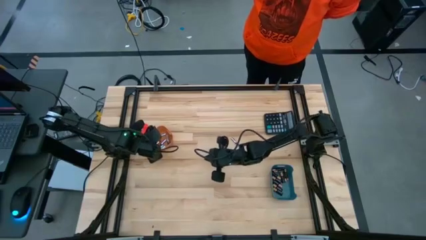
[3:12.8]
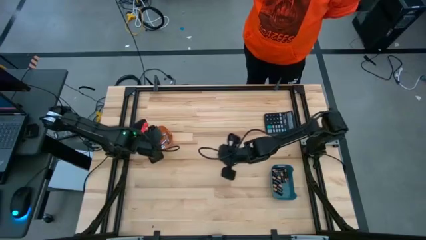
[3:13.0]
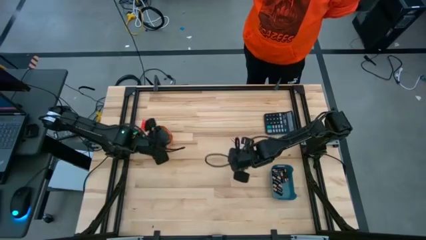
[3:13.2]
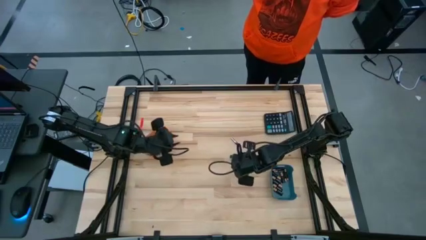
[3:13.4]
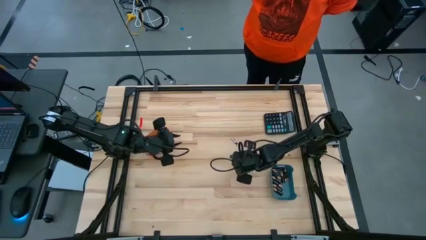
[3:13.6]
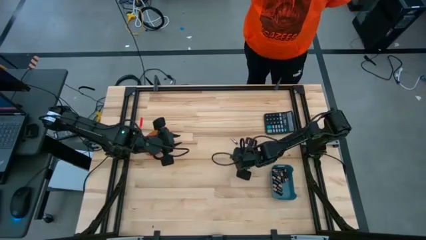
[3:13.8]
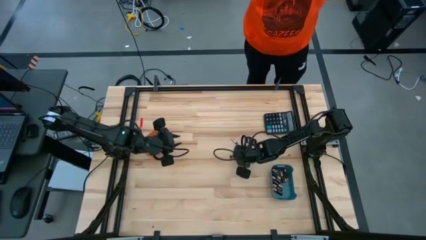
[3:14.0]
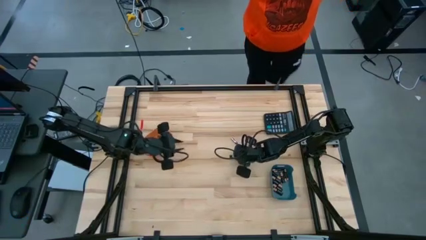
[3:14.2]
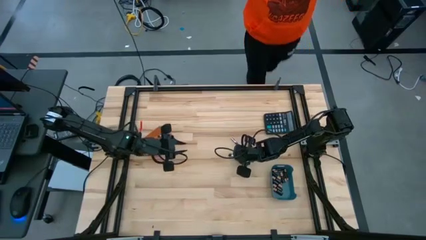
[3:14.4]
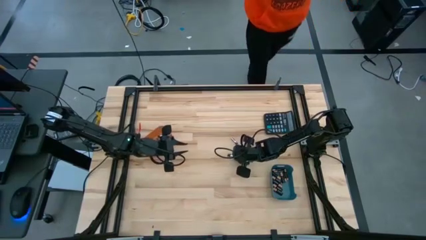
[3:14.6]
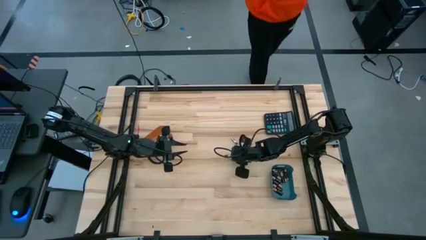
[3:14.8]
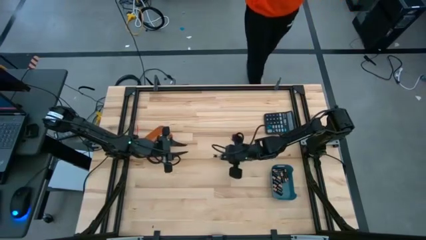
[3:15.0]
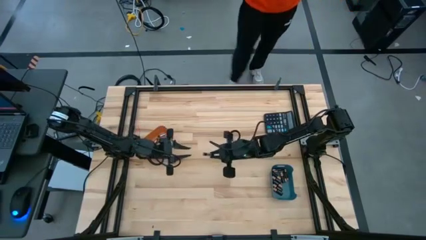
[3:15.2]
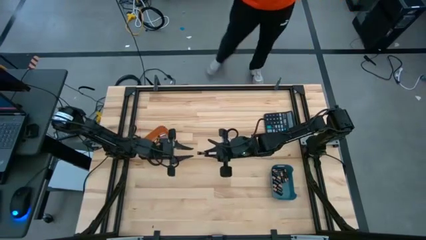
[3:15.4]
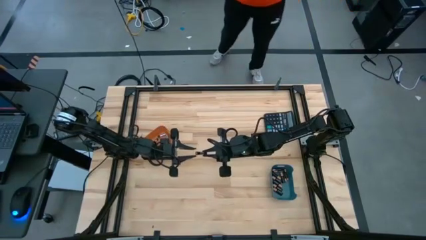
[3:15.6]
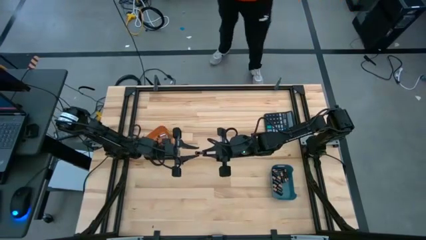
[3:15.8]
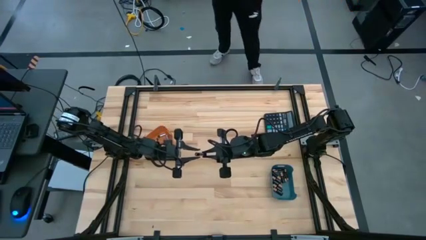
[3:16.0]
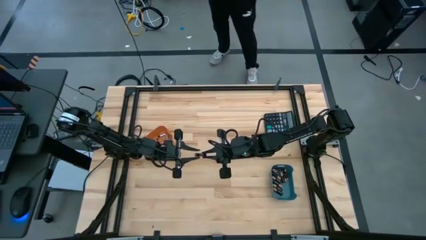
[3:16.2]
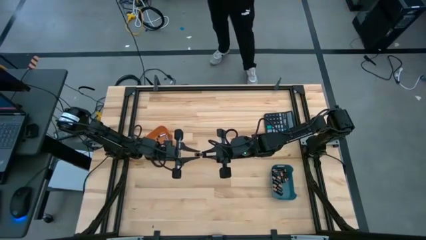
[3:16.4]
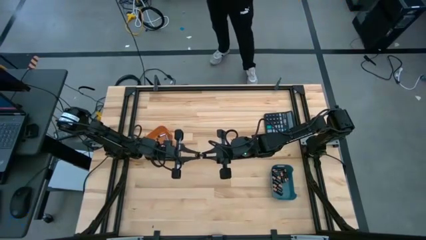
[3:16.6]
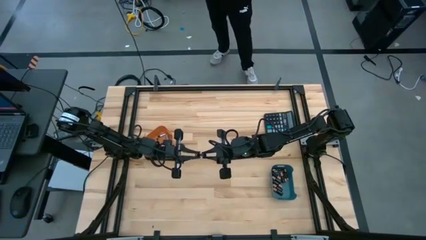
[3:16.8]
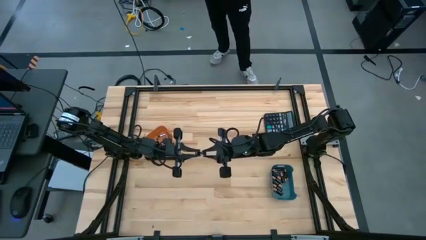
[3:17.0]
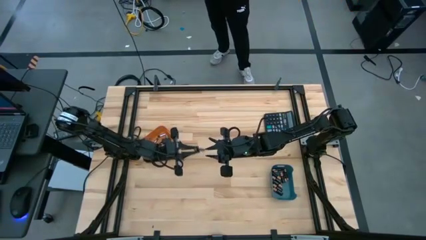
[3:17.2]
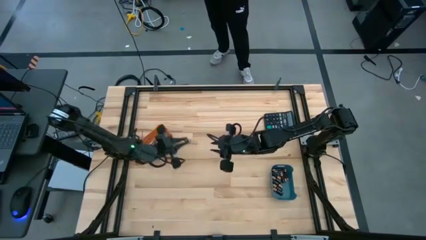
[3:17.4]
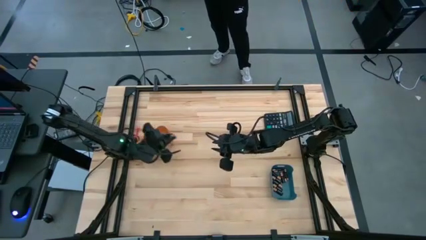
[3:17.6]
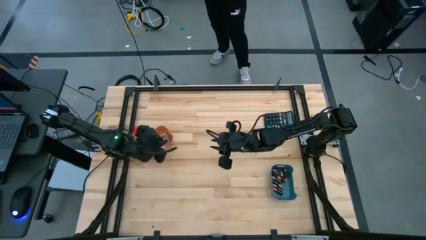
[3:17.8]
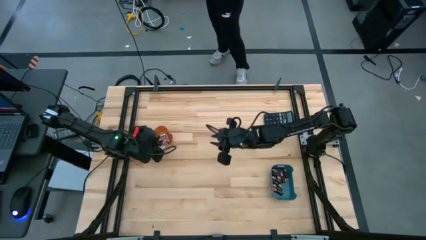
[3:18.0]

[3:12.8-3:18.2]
Task: Sort batteries
Put the silver battery into the orange bin

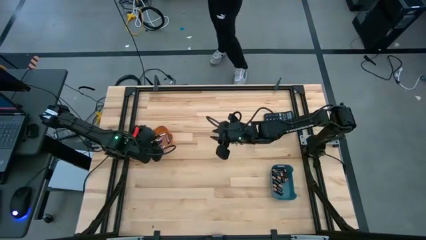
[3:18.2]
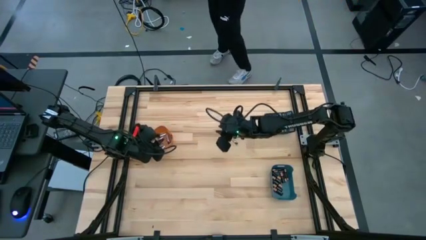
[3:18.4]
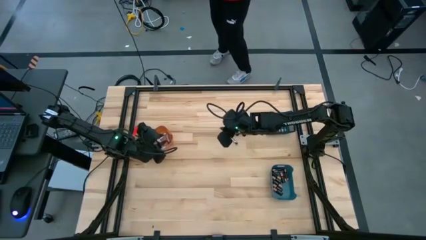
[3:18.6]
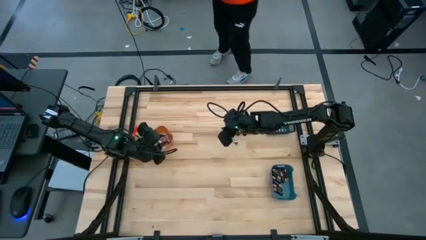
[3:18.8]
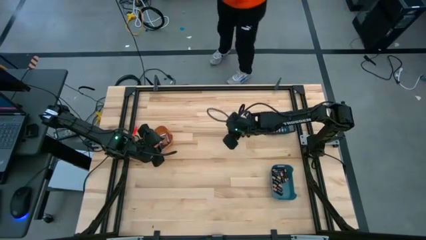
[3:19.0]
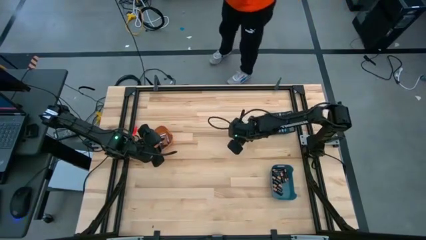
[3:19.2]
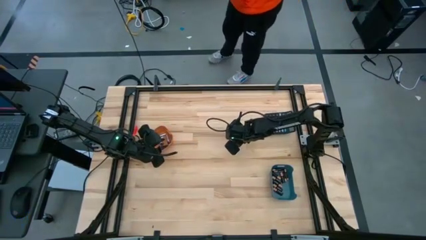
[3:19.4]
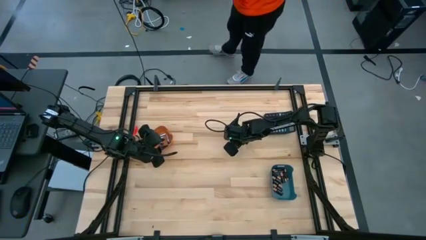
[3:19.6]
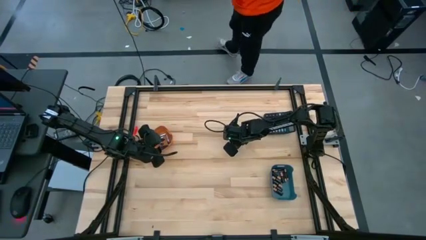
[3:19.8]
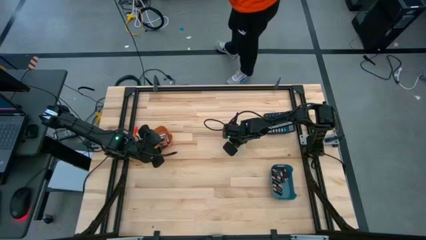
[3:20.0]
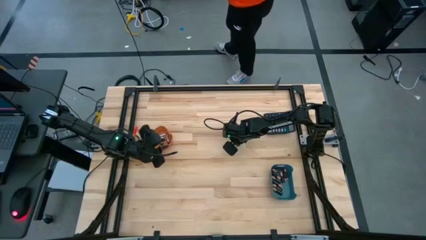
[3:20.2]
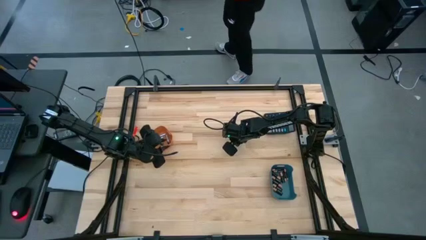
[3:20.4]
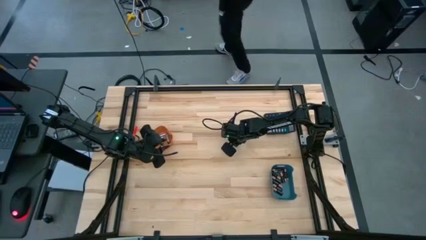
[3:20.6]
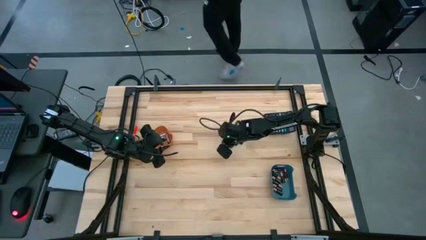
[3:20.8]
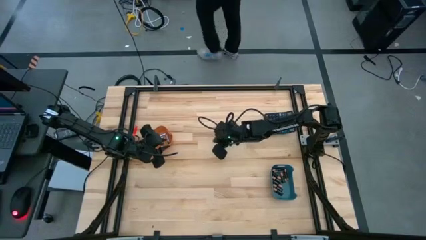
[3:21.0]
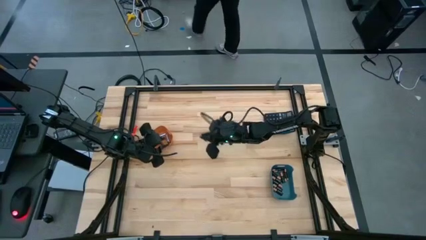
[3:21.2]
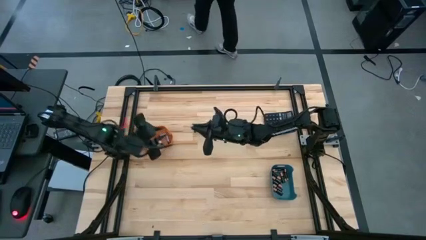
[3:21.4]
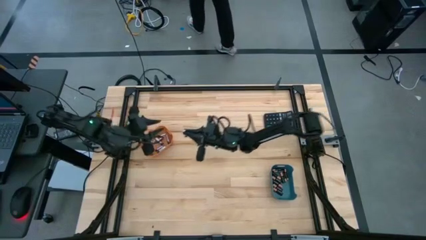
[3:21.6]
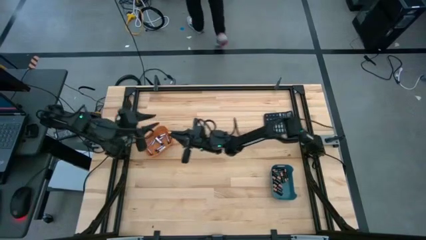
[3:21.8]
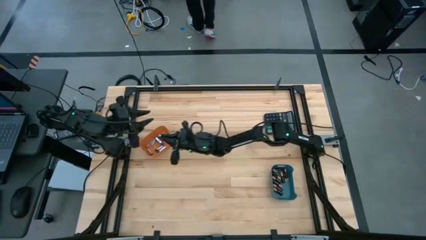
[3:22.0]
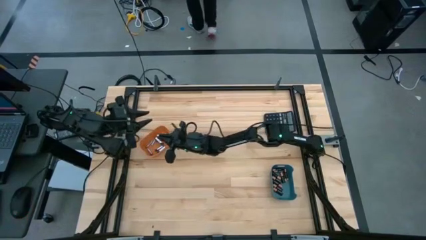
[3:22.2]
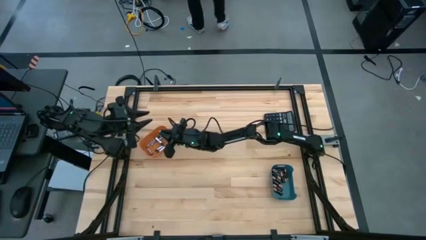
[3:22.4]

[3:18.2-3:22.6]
Put the silver battery into the orange bin

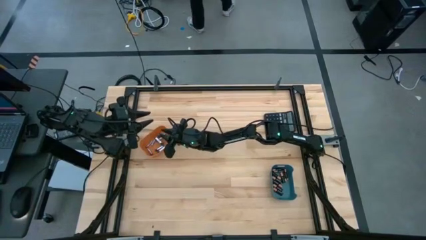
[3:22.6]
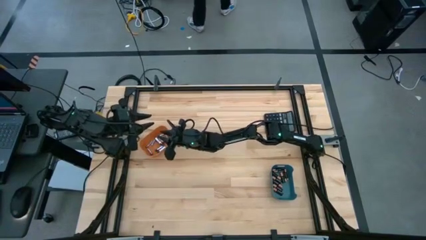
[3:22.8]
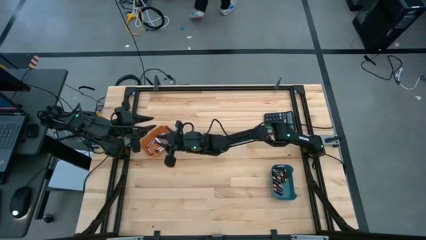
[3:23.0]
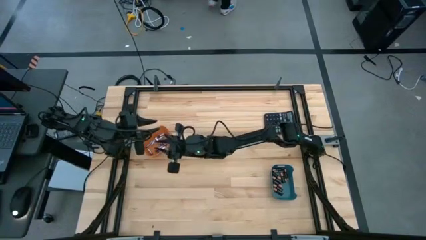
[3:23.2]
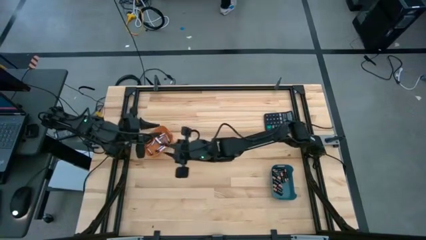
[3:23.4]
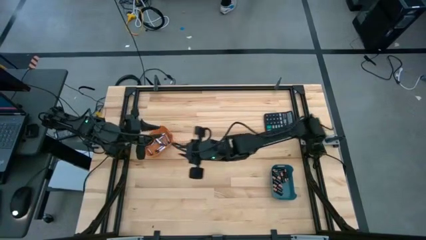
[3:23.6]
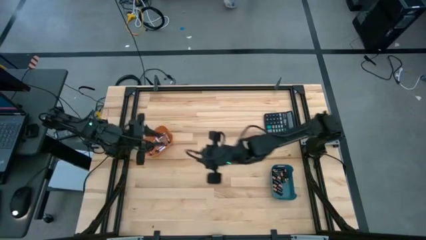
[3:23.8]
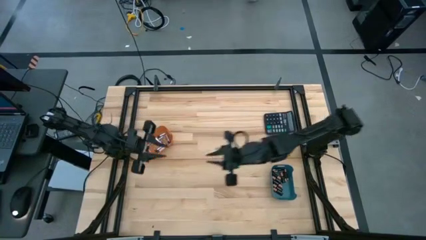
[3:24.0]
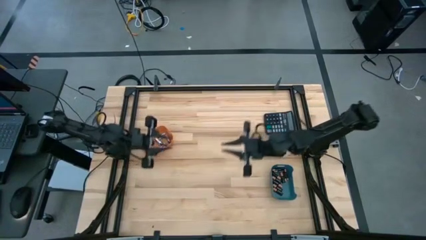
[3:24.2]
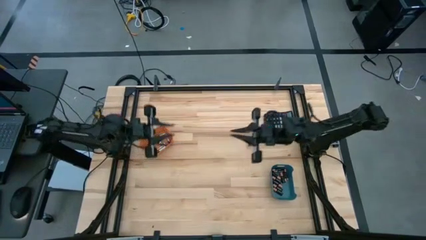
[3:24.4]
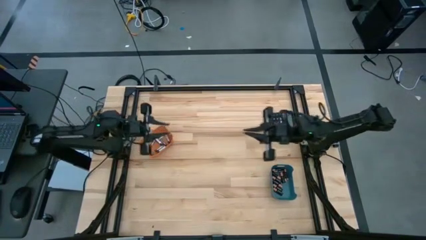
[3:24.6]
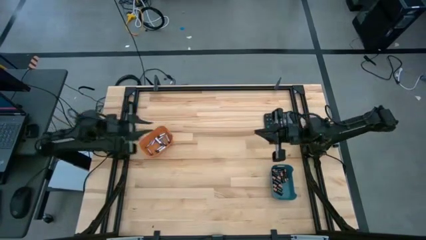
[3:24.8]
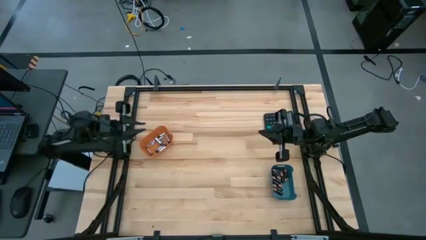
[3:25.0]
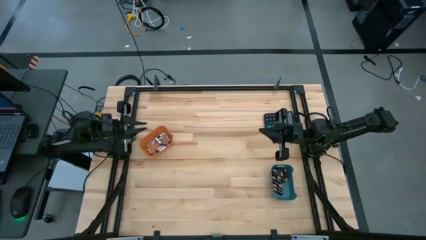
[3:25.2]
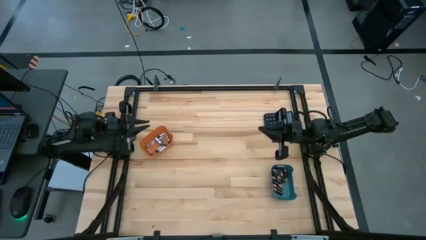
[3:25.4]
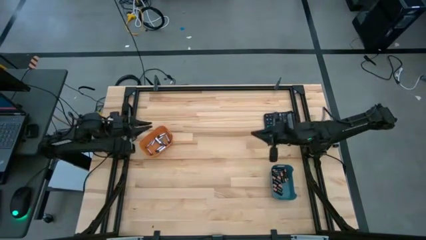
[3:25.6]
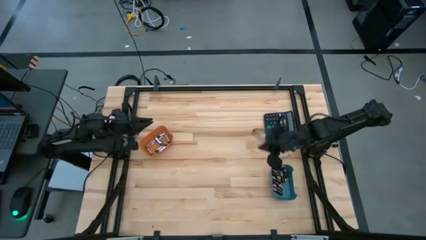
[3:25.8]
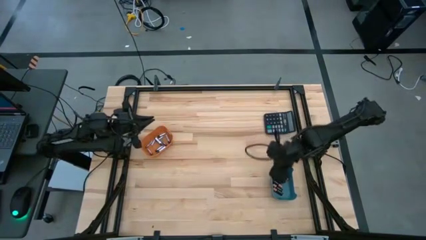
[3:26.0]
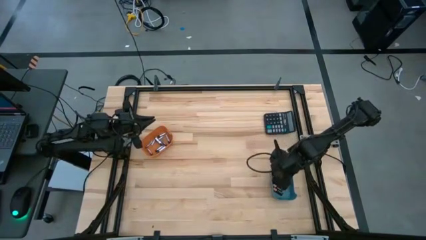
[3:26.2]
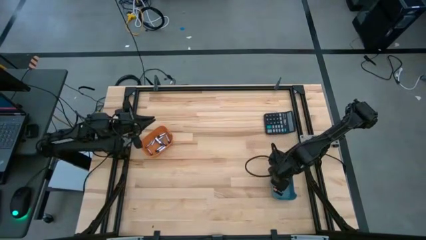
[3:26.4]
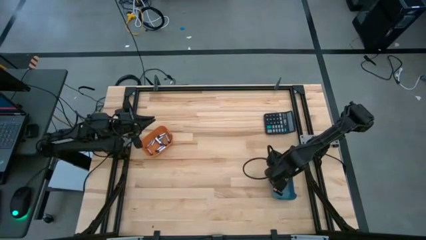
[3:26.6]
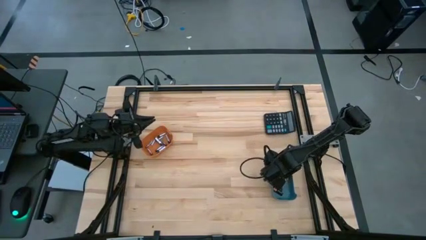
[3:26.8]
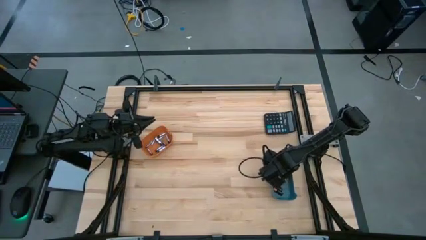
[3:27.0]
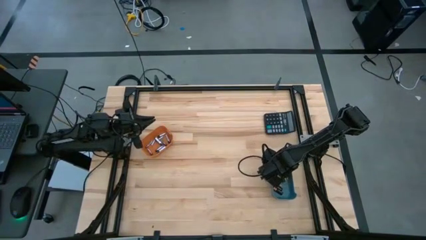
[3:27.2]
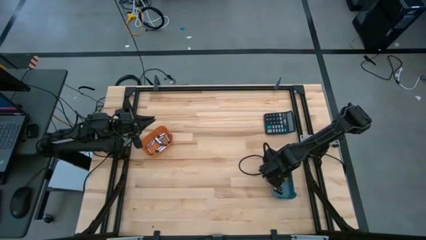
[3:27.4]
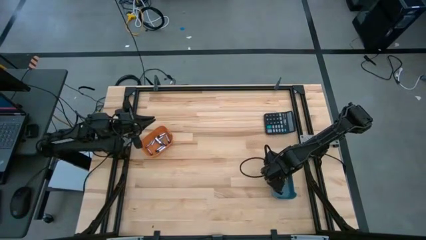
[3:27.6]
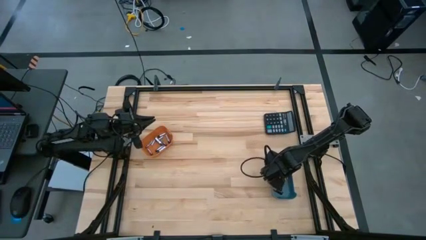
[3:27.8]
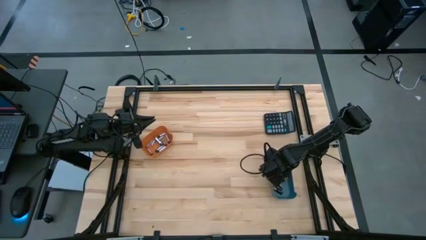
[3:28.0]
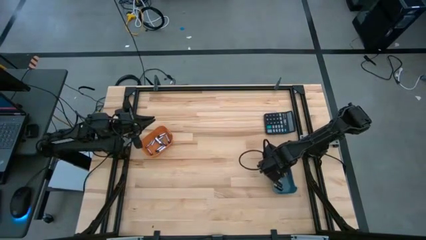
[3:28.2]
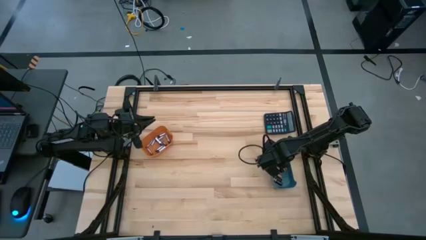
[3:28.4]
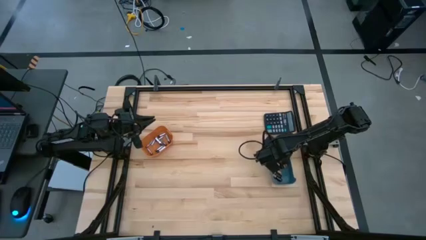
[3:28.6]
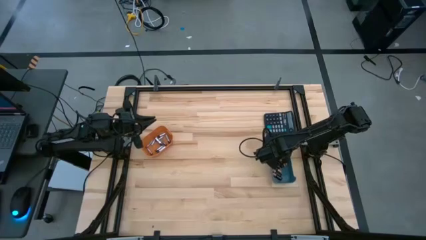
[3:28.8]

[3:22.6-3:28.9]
Adjust the blue bin

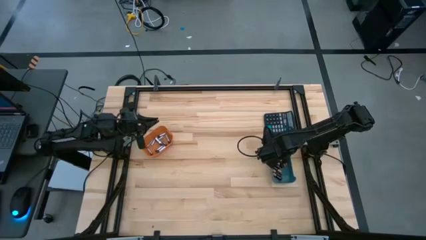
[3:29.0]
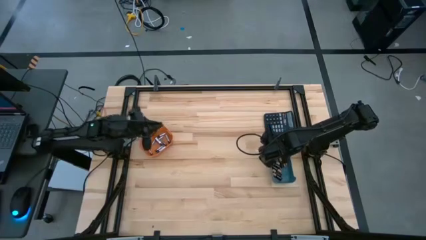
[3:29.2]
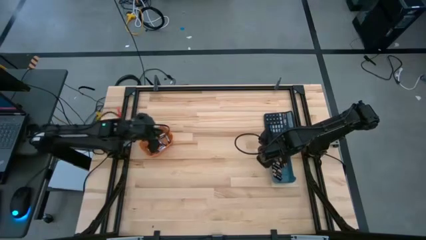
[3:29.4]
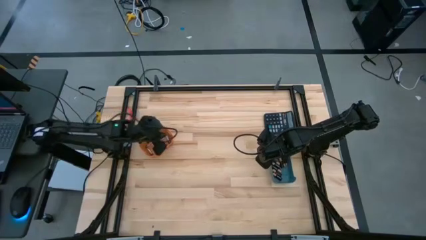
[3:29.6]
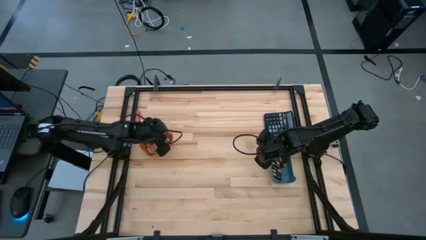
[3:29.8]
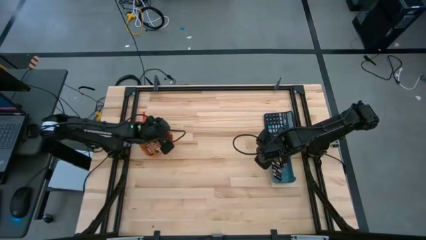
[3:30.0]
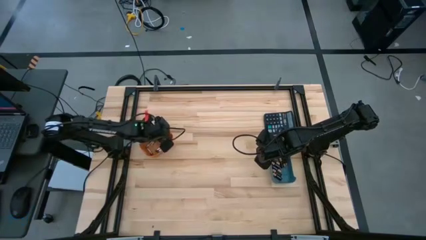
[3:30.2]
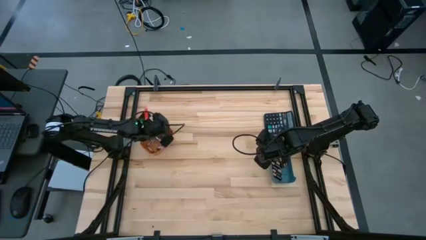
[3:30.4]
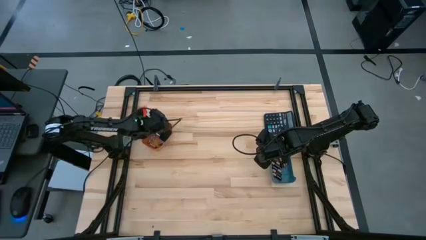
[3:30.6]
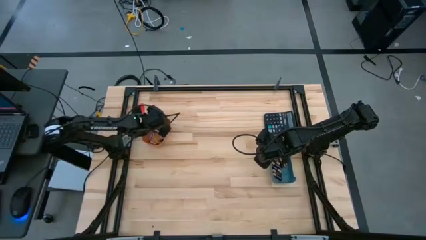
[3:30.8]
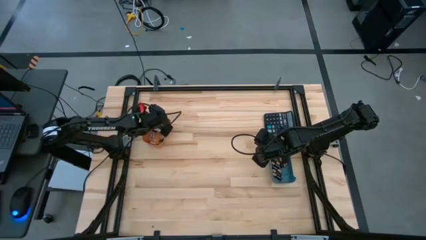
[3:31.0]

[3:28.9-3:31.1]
Adjust the orange bin
